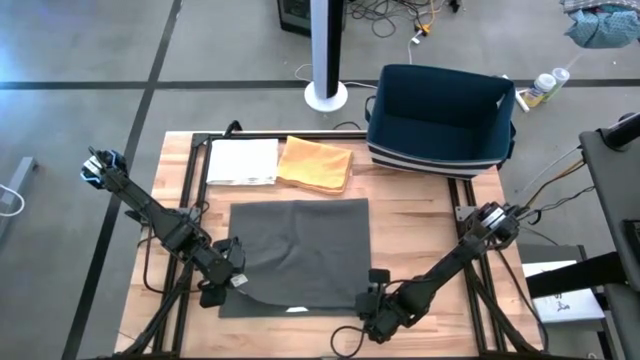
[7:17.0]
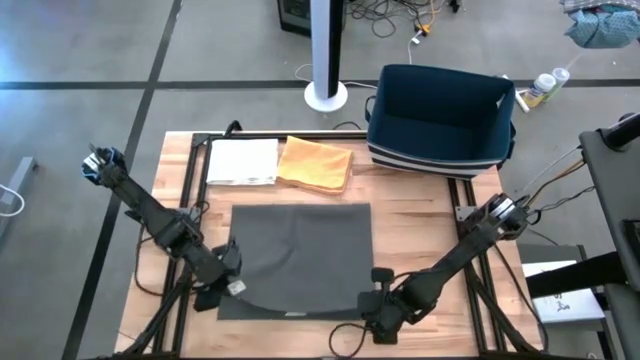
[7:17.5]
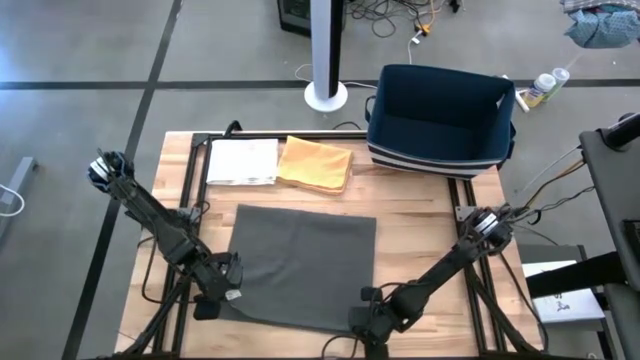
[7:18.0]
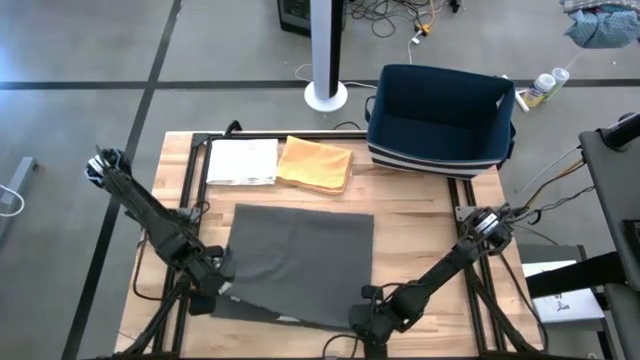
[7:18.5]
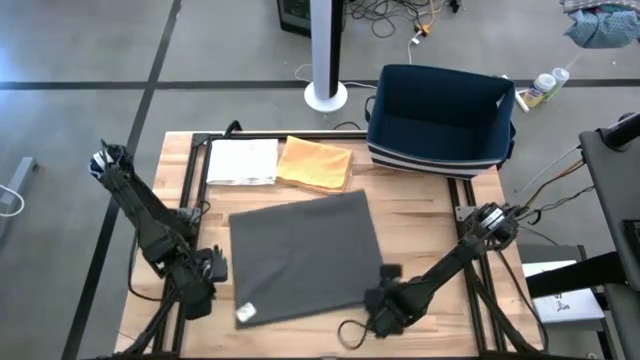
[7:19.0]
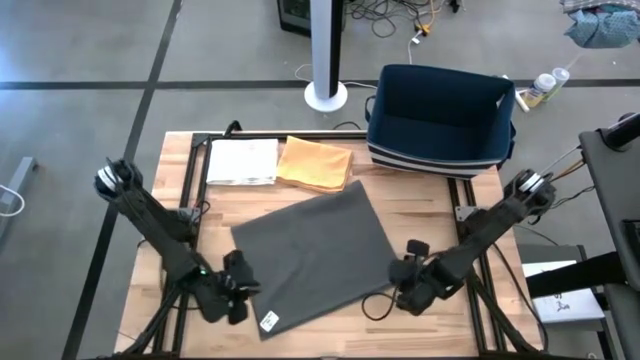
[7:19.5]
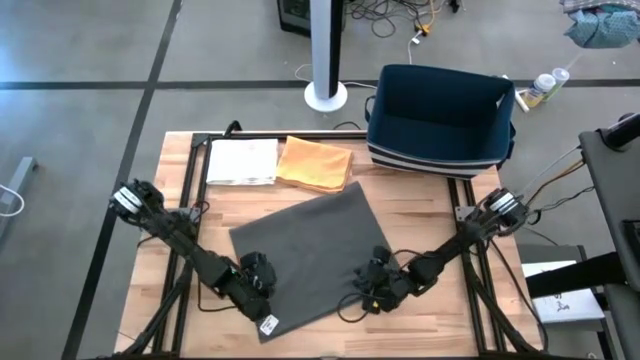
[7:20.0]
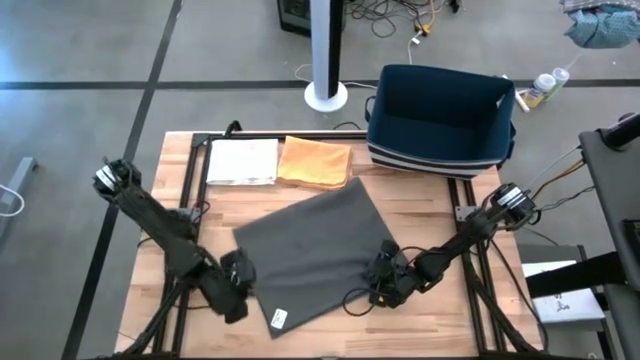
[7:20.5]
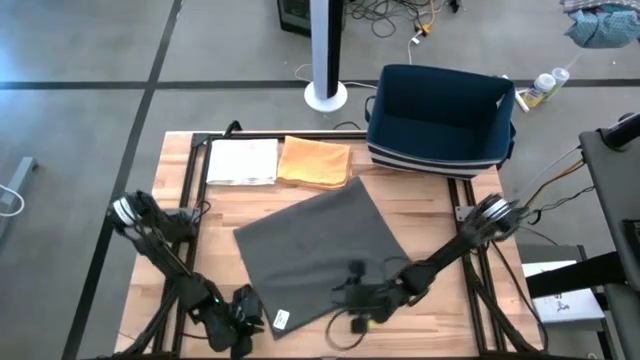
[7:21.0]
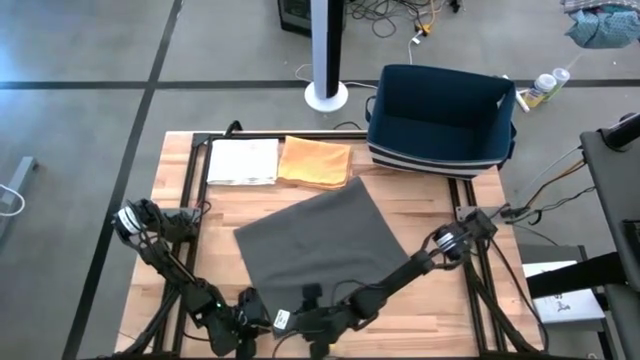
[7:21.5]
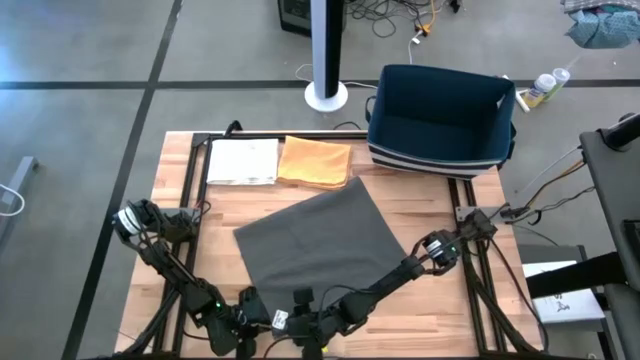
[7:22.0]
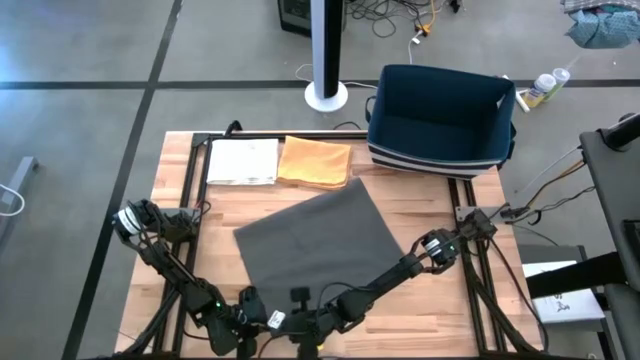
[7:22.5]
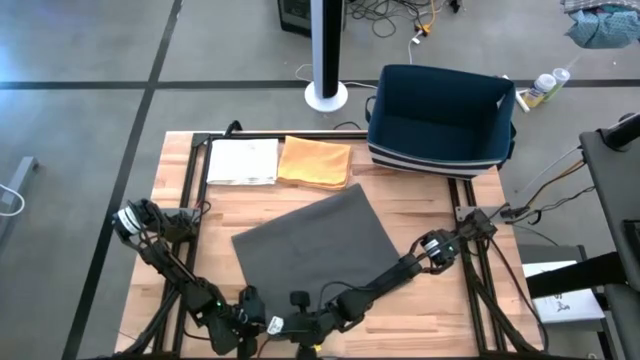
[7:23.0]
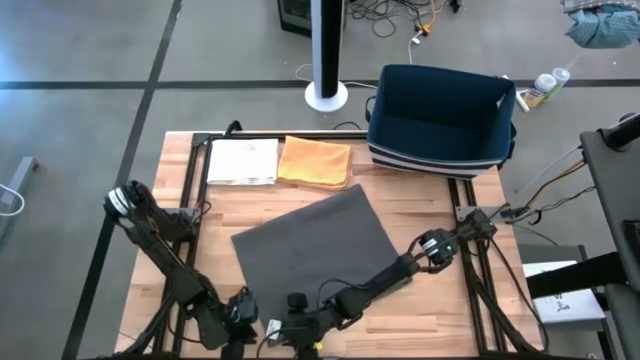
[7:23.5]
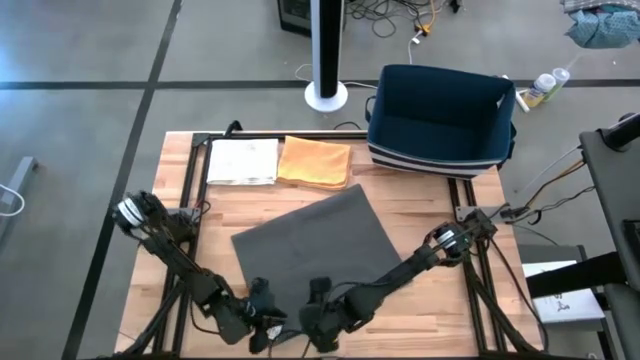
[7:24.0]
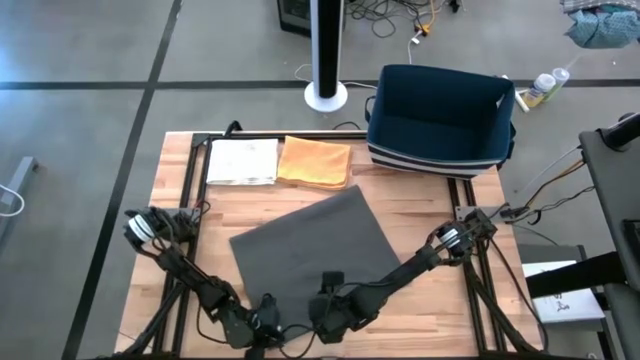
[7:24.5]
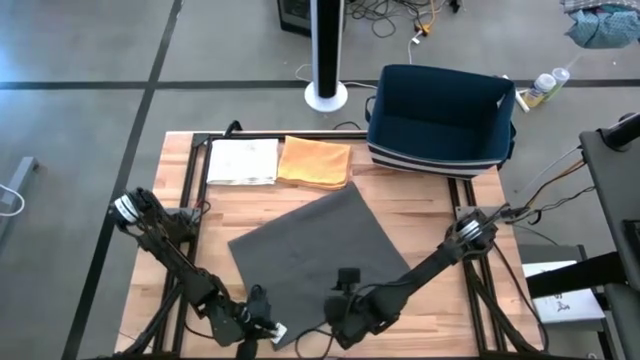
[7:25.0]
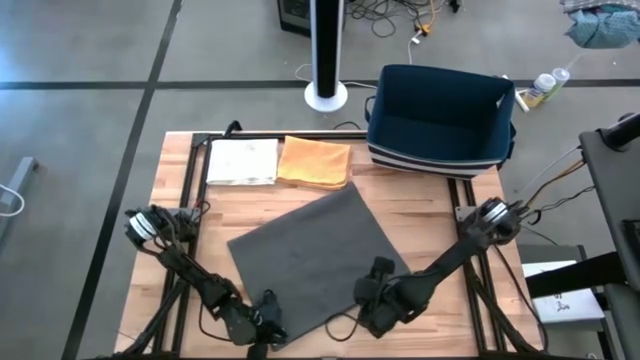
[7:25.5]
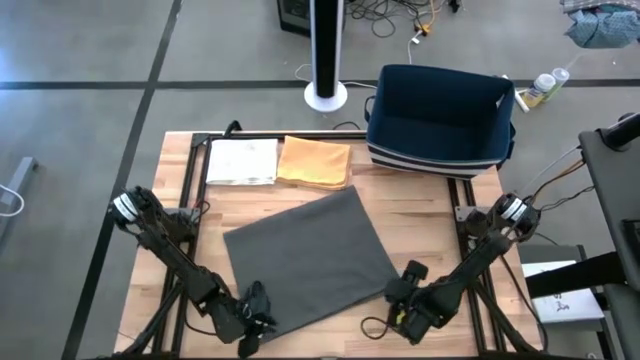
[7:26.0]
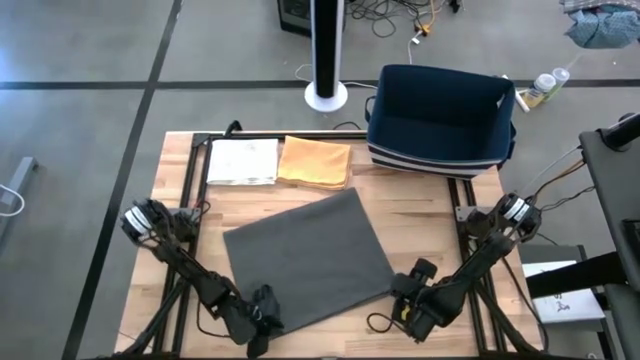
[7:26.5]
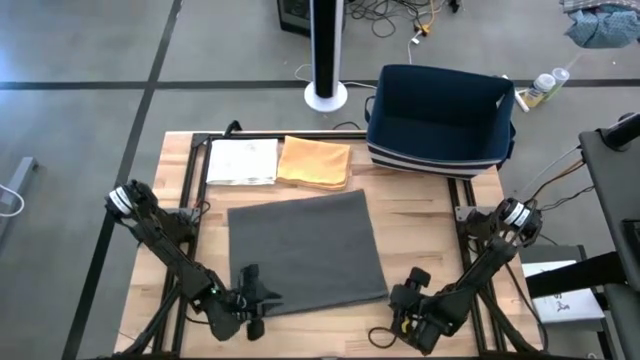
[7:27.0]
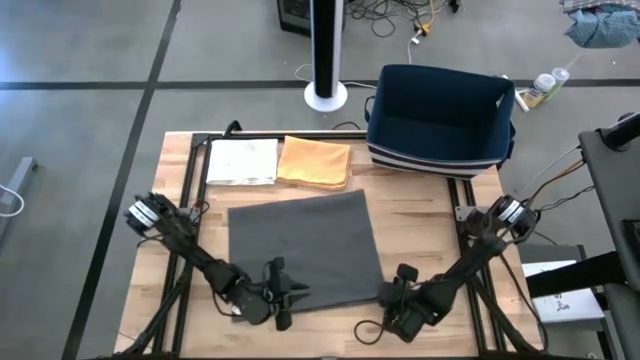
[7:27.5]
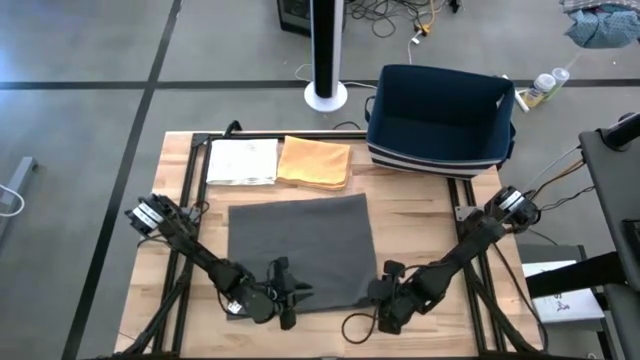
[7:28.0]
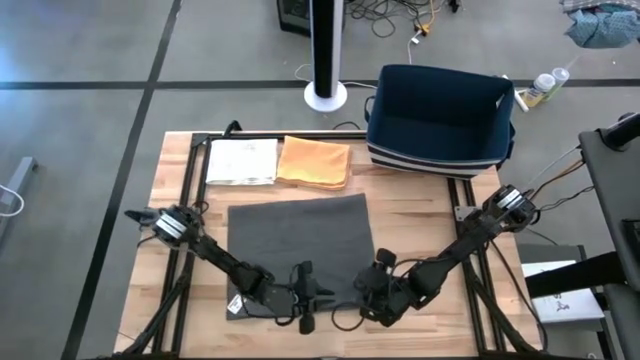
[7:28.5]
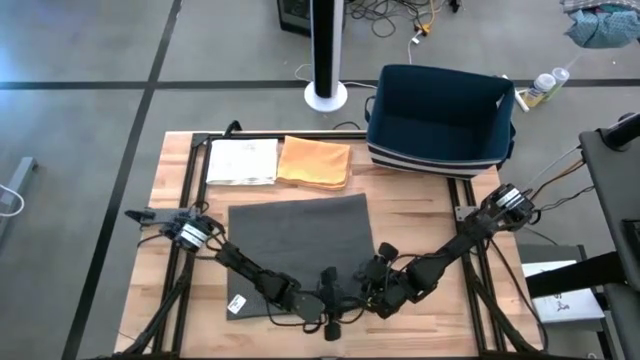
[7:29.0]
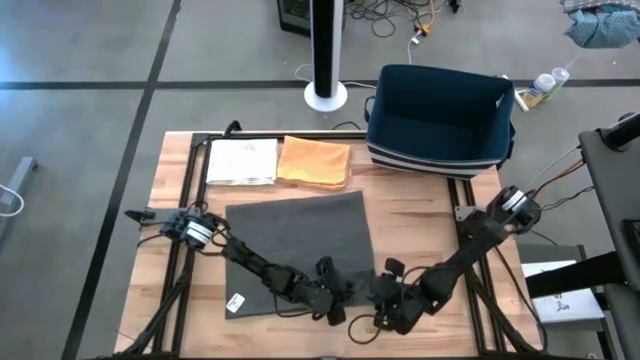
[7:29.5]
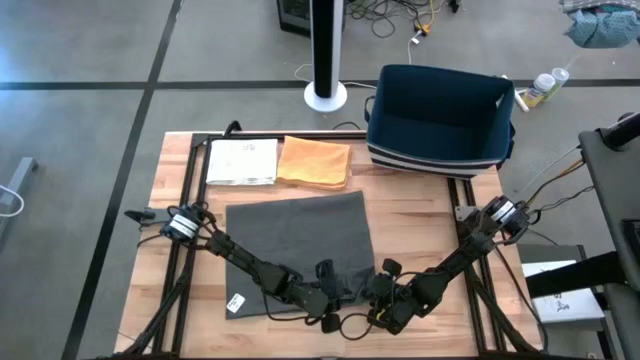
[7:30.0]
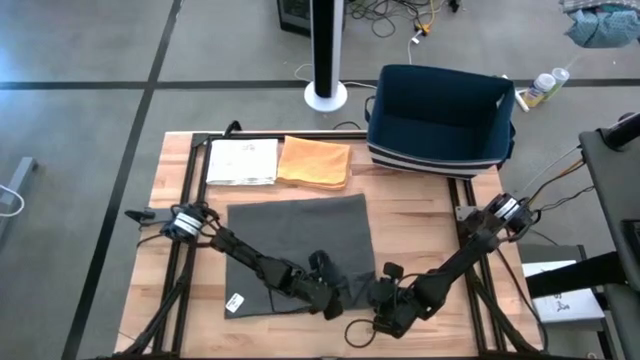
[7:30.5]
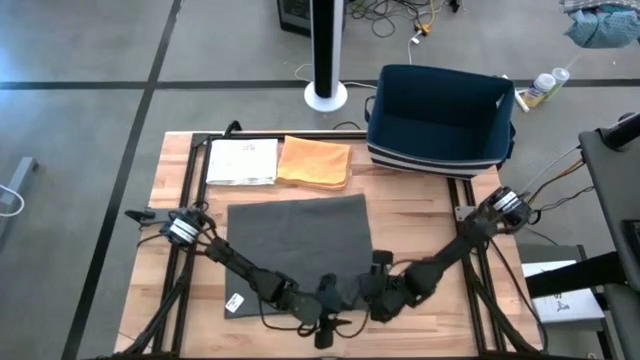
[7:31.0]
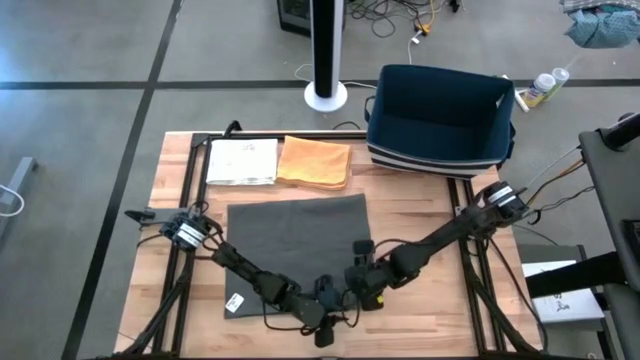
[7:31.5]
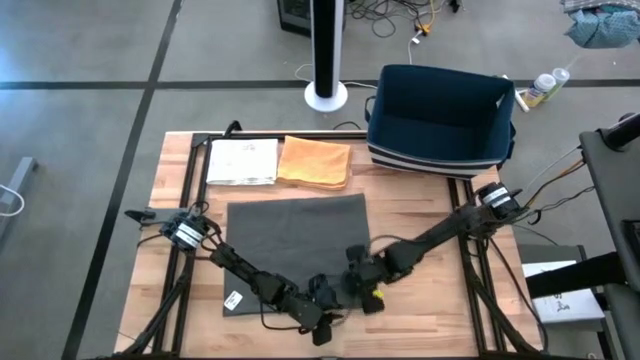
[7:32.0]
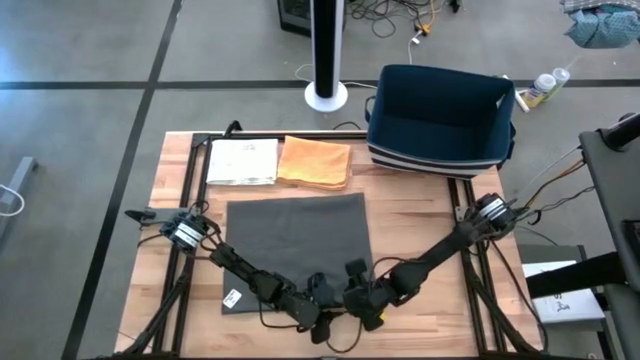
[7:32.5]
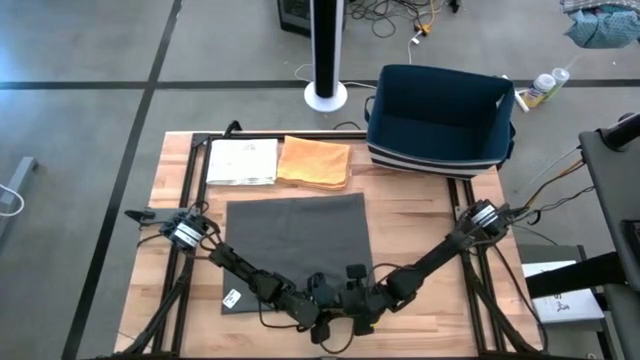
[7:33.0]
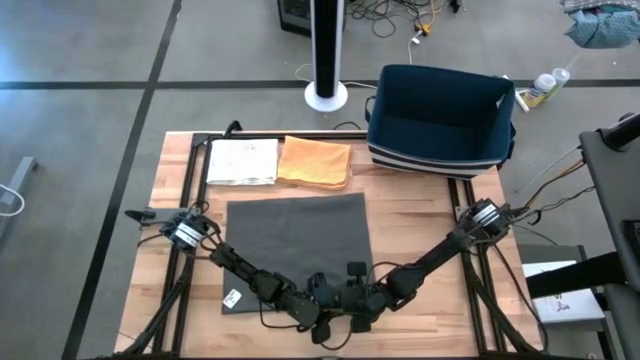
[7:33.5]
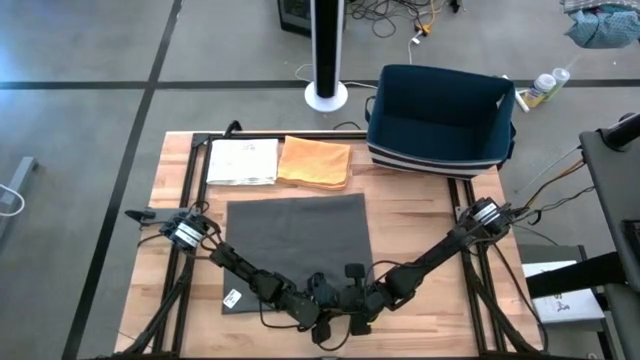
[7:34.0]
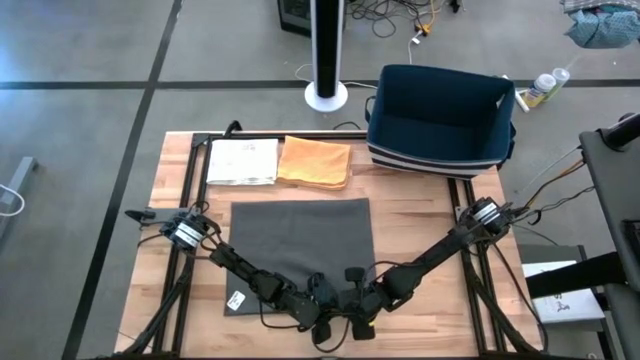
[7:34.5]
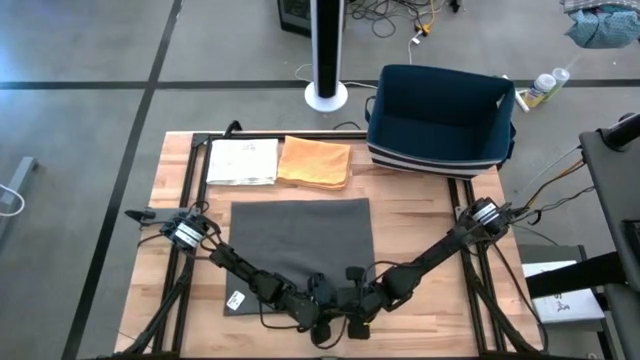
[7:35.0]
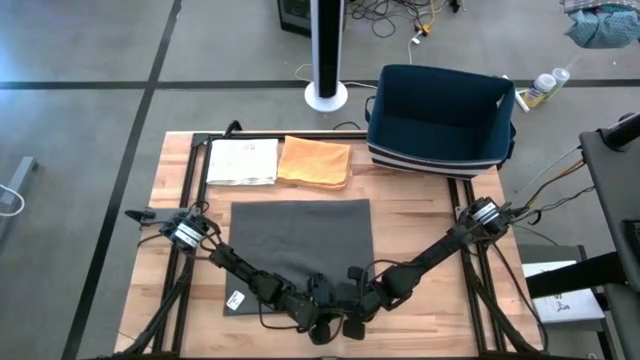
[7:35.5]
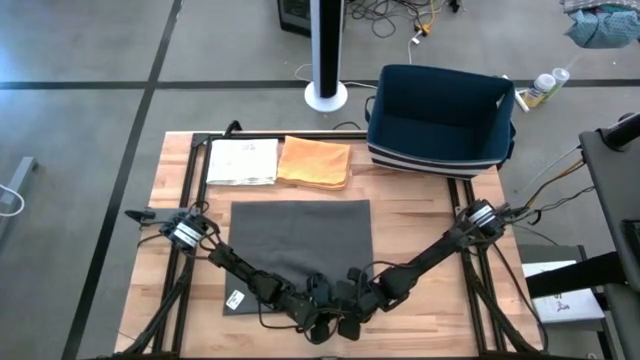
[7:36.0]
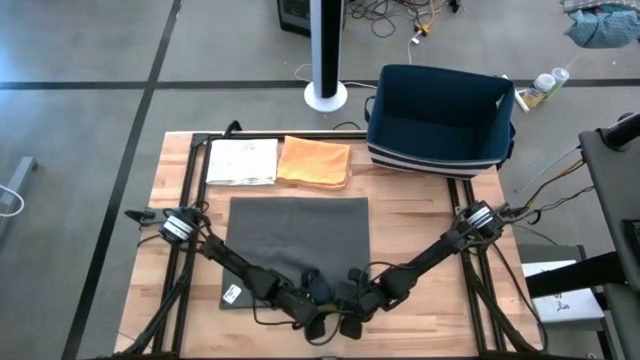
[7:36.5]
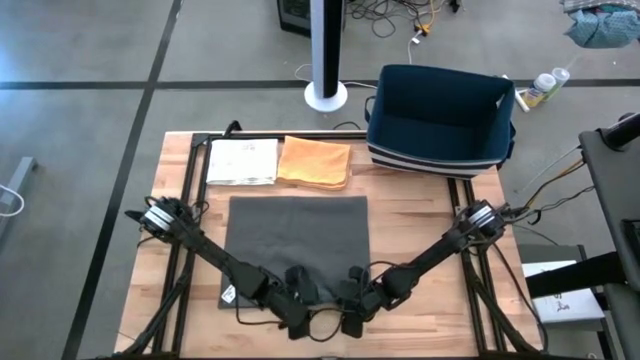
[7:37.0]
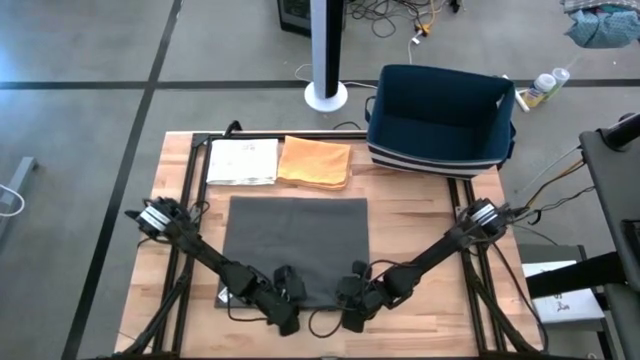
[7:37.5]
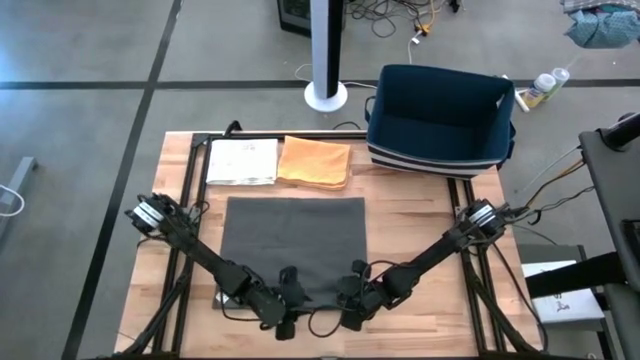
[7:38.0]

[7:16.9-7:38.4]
Task: Fold towel
Fold the black towel
